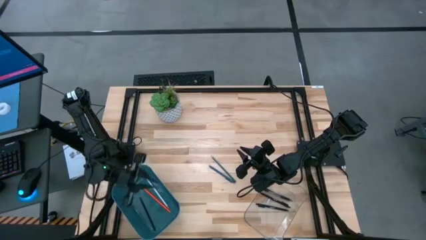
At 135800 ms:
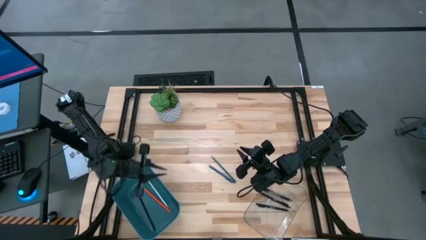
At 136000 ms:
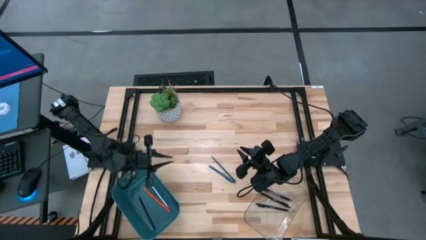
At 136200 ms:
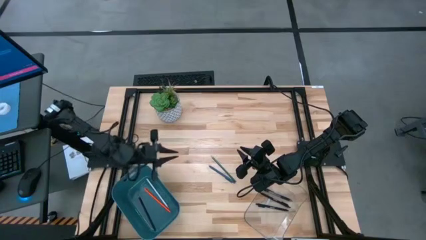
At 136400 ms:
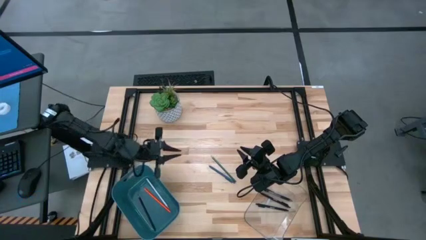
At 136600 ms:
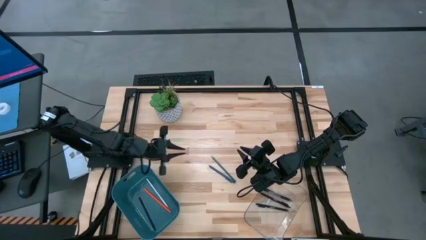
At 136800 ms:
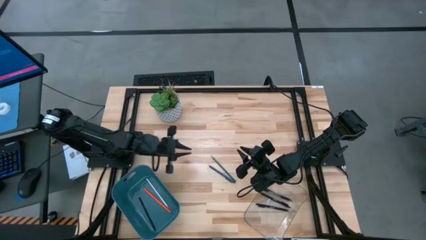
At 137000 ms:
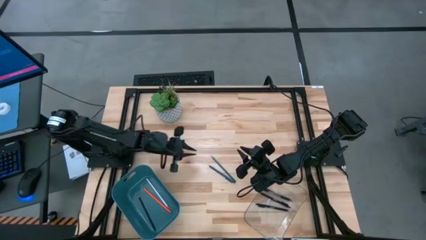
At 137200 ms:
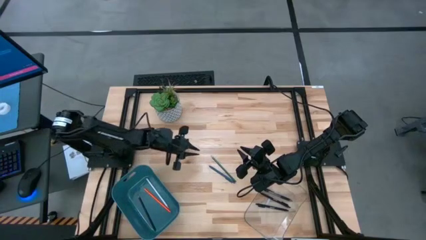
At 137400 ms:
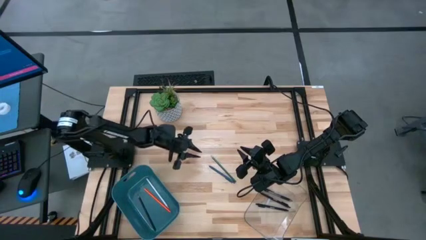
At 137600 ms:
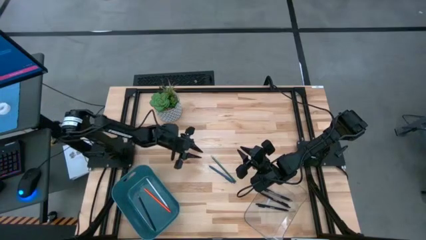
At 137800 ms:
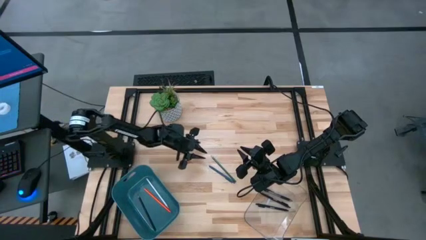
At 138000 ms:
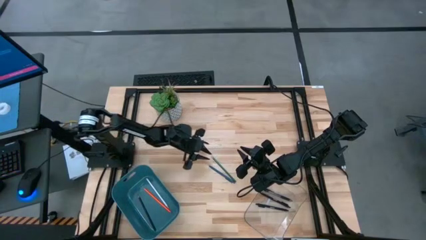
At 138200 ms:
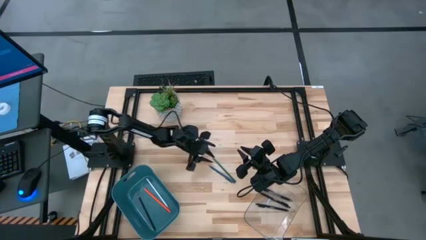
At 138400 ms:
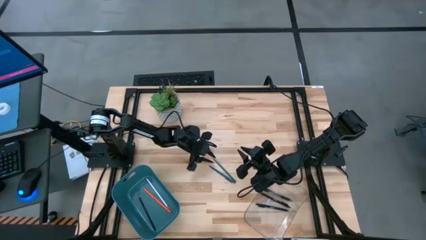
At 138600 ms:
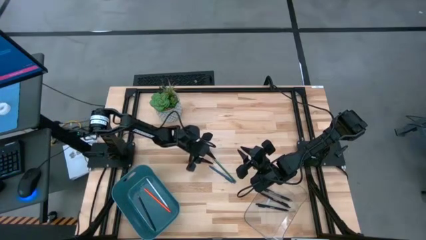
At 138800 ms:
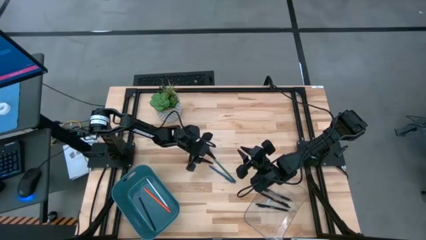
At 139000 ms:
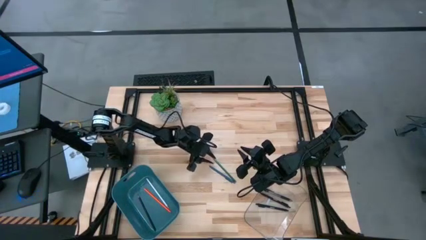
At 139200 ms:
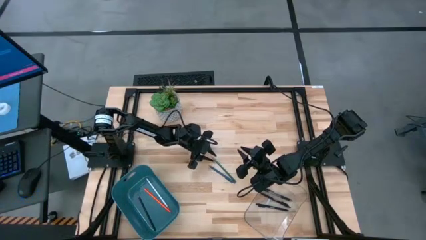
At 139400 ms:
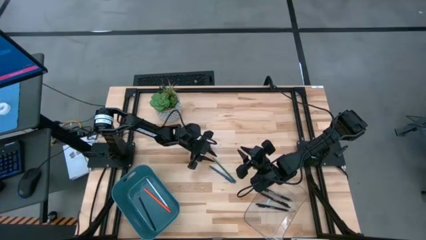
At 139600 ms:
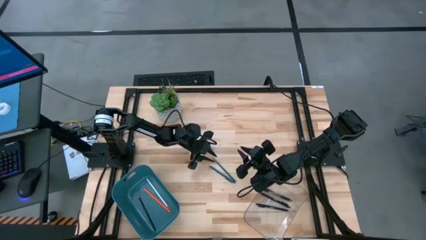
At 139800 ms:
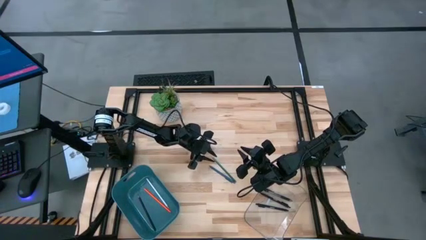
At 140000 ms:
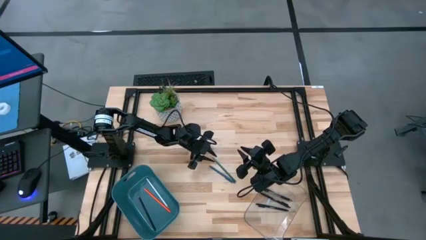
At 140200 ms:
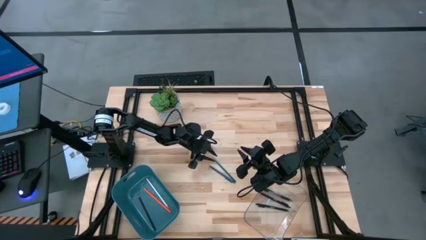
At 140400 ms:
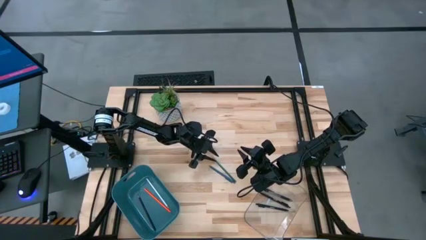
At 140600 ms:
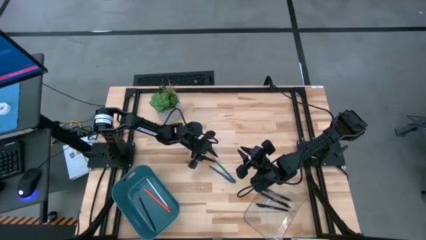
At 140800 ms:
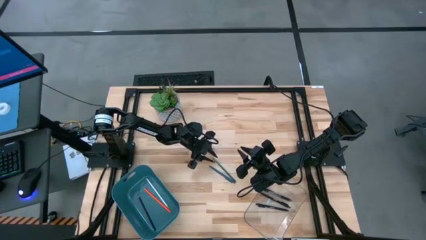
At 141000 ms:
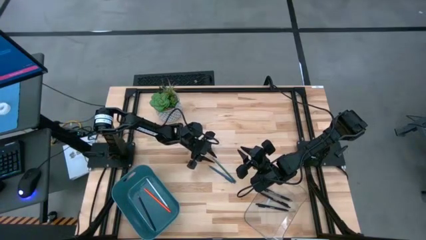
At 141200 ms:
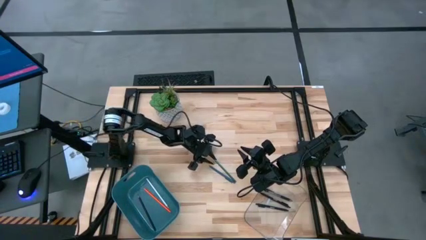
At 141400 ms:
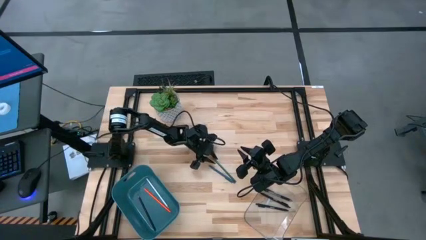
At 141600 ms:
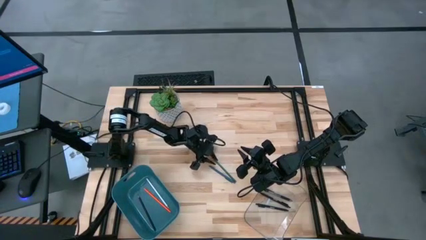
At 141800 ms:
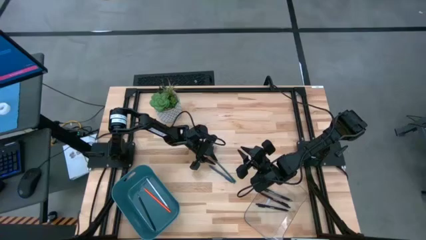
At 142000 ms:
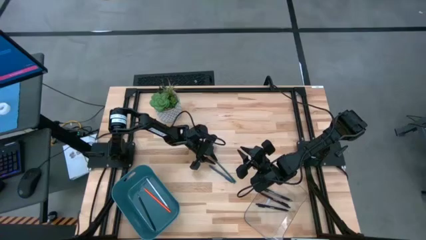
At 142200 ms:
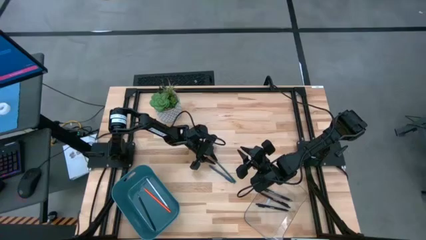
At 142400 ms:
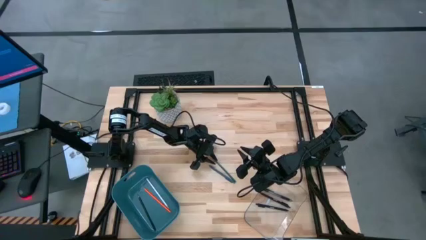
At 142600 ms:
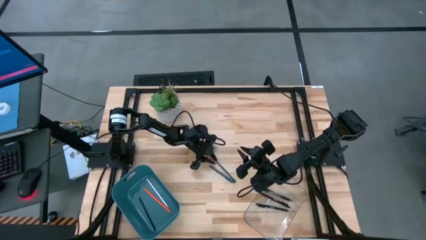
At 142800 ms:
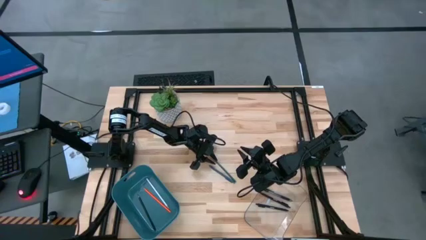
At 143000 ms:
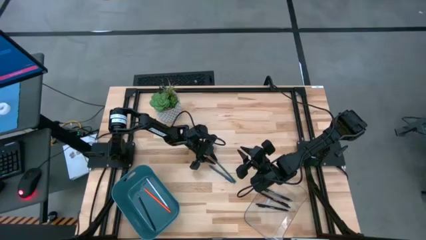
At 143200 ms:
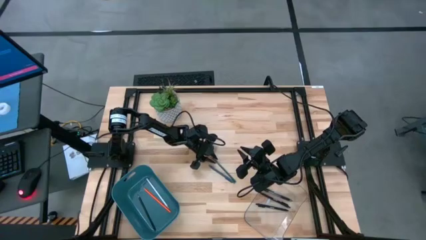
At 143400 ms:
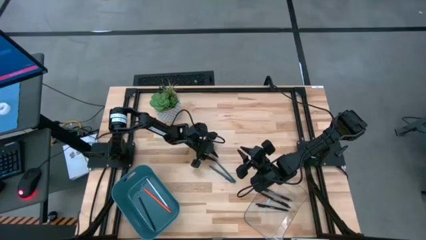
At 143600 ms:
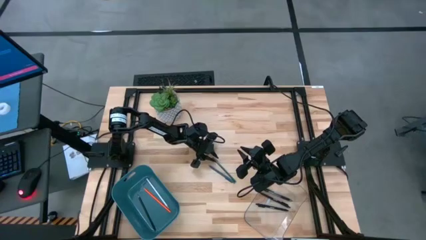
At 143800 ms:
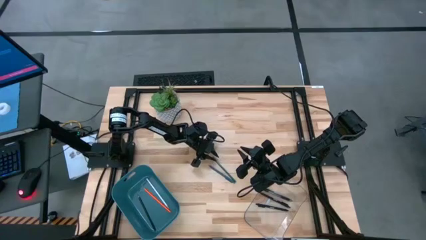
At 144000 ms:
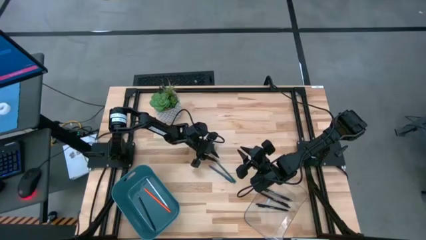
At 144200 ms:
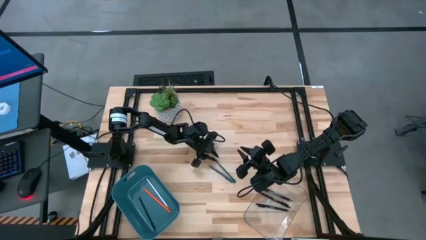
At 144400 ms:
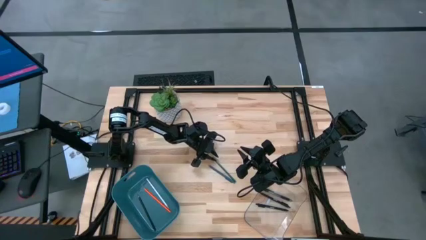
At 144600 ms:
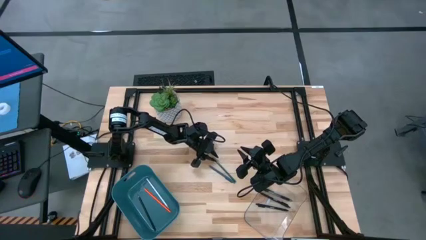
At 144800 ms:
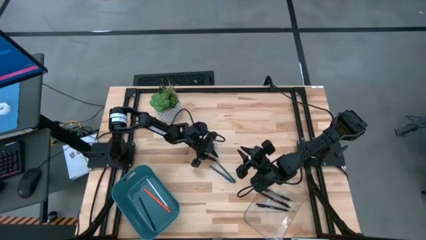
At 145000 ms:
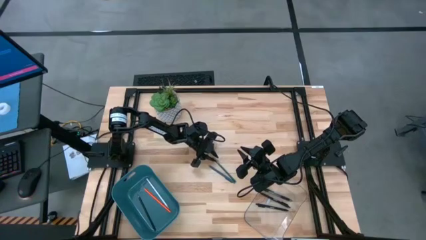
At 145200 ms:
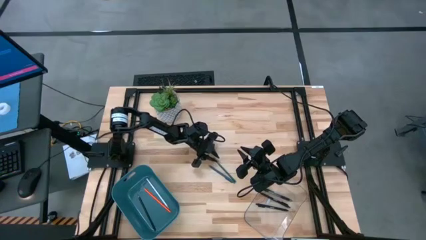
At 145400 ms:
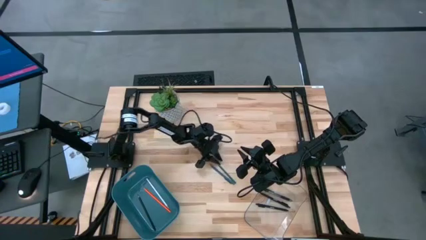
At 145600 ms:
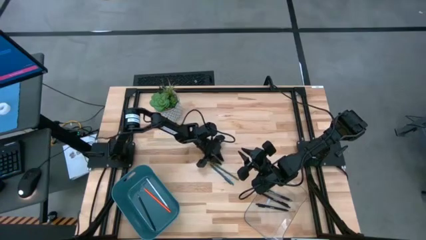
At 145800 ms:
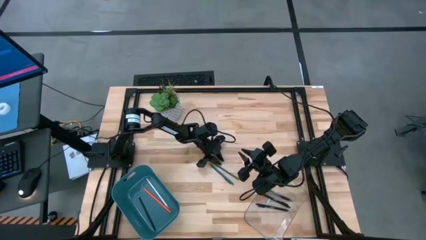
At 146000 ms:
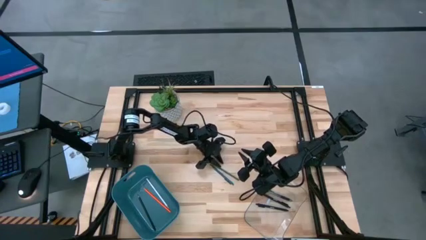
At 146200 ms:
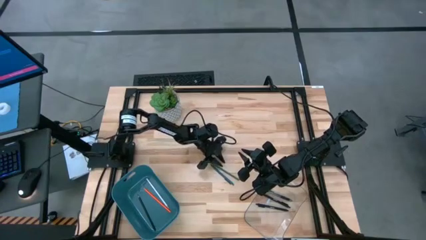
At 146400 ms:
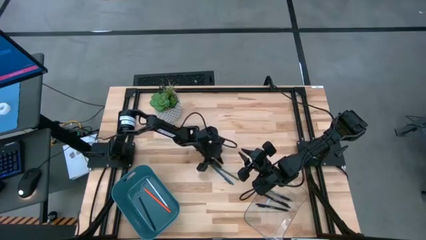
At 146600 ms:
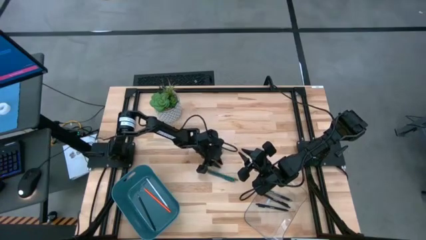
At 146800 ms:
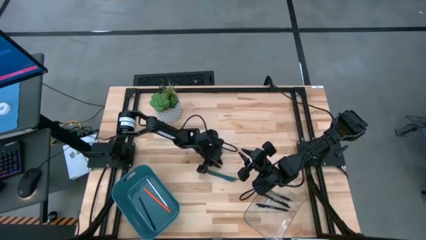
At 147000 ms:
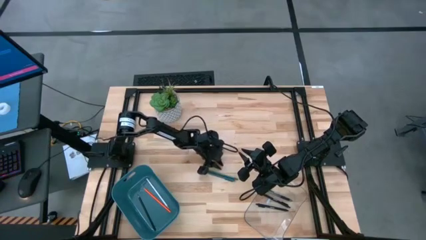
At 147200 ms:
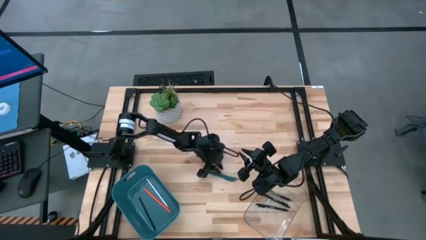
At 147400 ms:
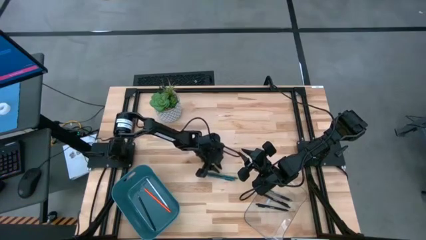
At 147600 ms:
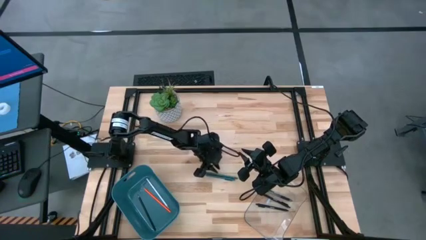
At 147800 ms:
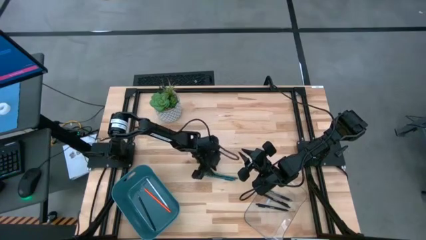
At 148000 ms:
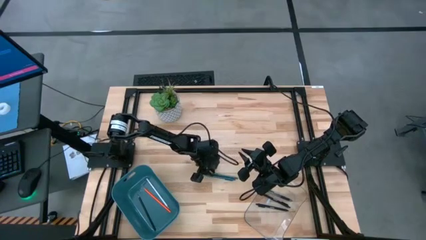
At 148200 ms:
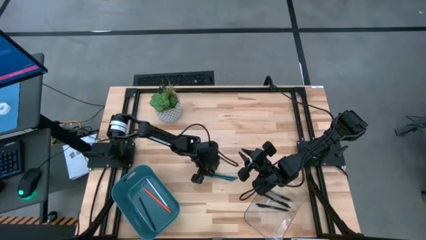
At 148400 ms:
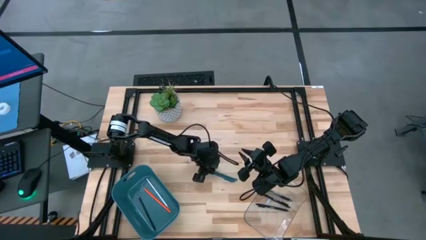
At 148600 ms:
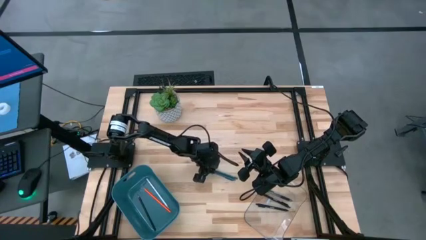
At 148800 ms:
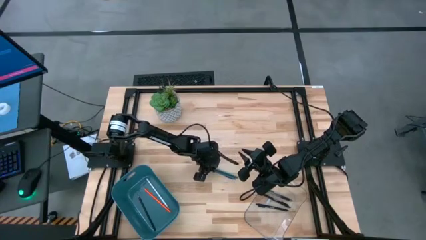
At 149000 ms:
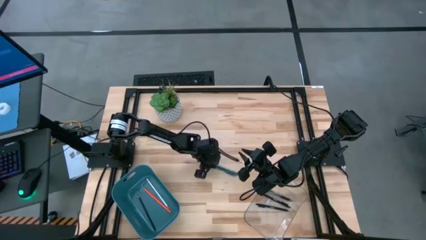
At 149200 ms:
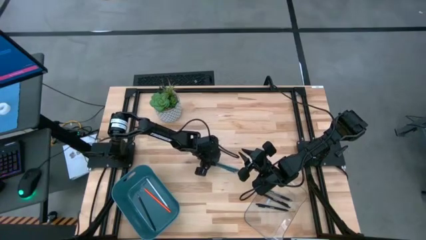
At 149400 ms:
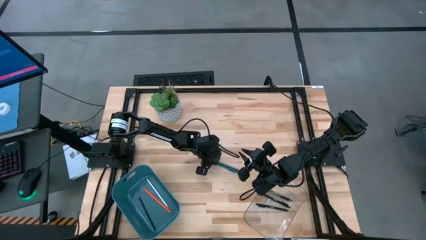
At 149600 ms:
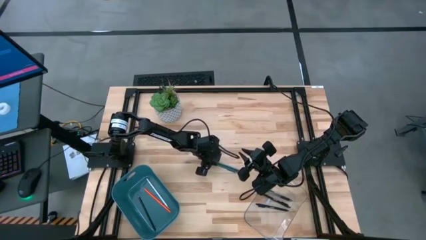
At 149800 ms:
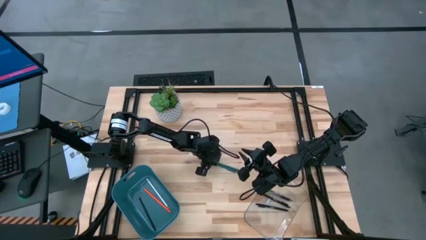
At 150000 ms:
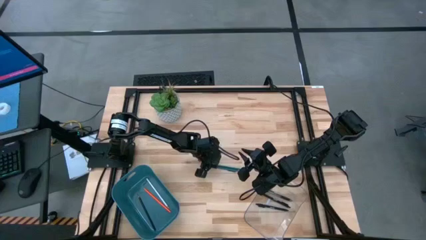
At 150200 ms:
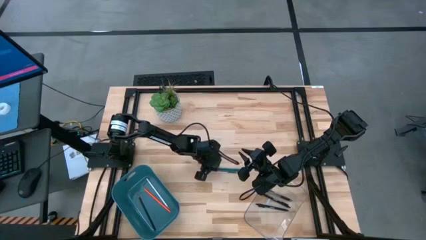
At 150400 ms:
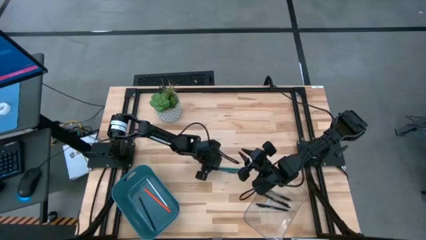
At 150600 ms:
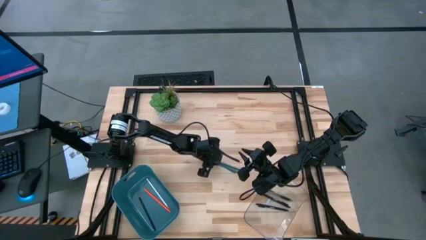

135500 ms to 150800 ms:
Task: Sort pens & pencils
Put the green pencil into the blue bin
